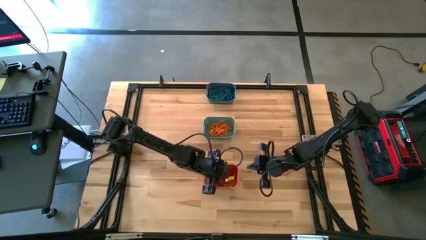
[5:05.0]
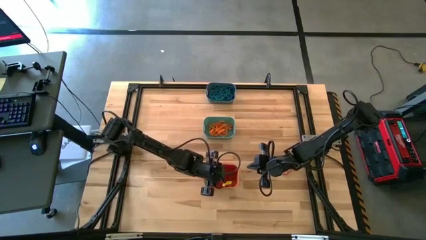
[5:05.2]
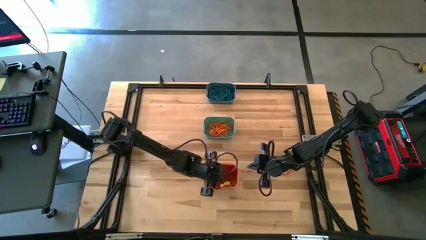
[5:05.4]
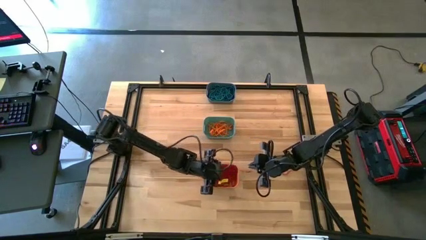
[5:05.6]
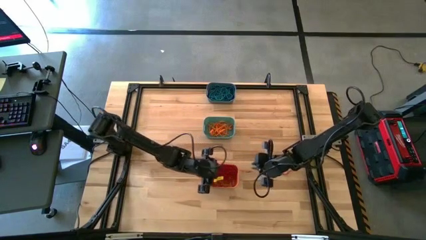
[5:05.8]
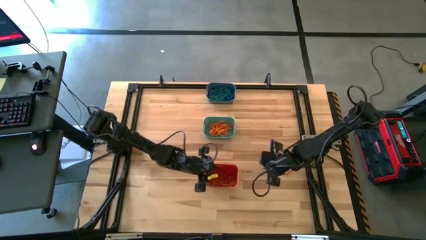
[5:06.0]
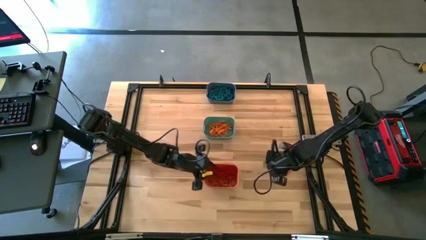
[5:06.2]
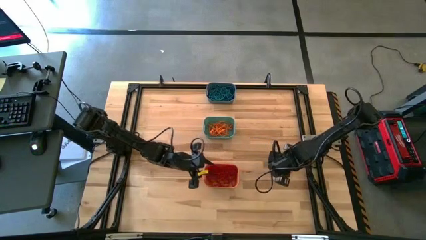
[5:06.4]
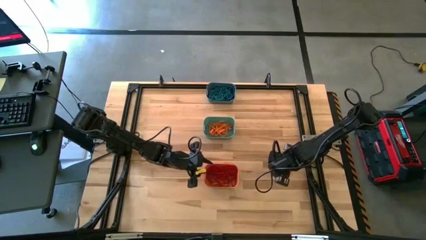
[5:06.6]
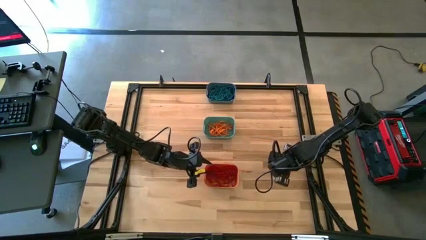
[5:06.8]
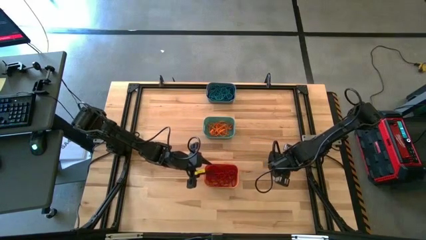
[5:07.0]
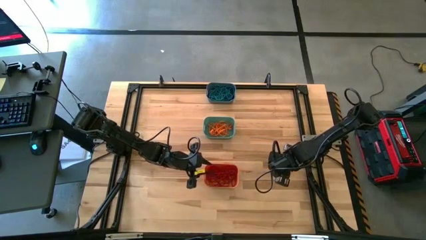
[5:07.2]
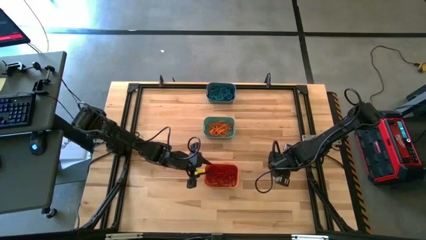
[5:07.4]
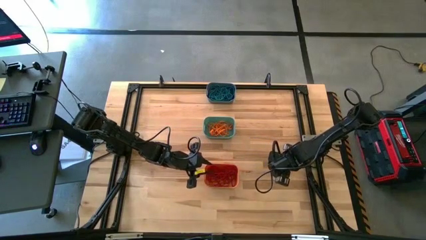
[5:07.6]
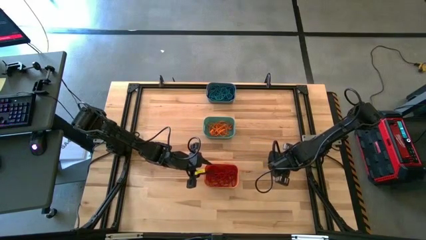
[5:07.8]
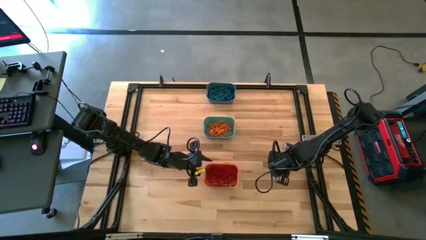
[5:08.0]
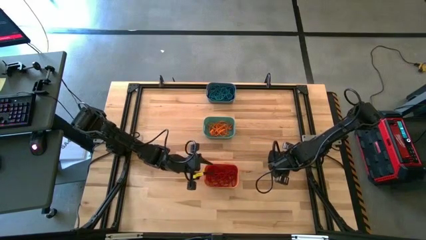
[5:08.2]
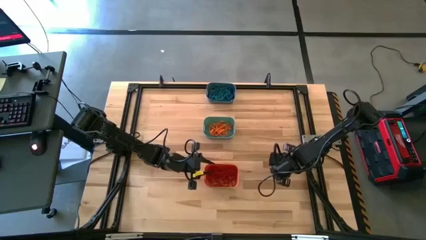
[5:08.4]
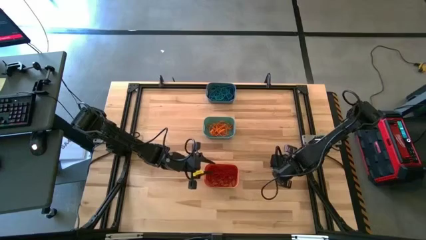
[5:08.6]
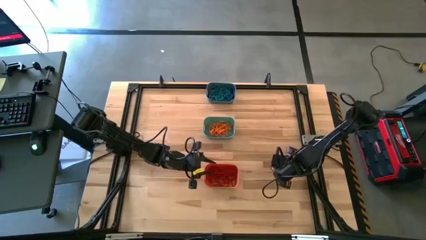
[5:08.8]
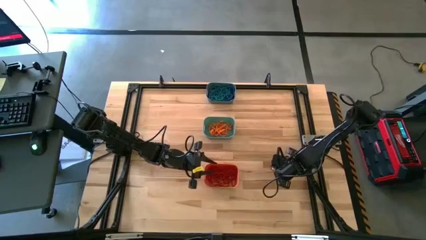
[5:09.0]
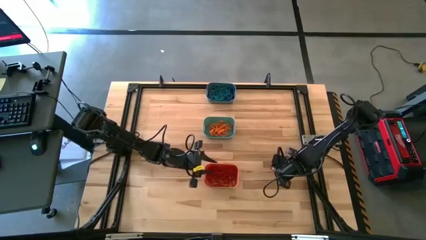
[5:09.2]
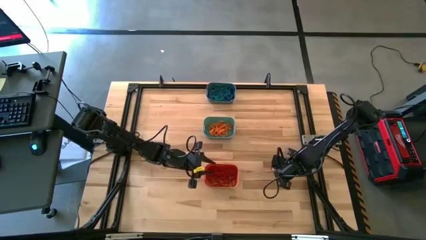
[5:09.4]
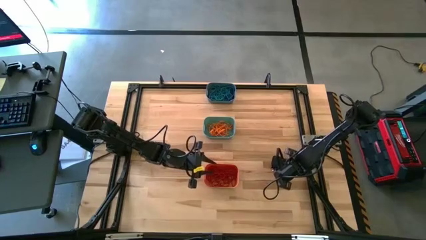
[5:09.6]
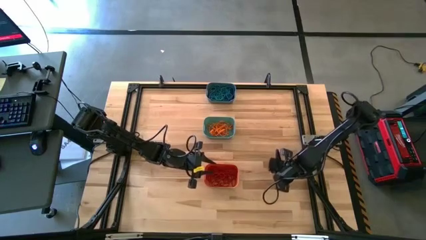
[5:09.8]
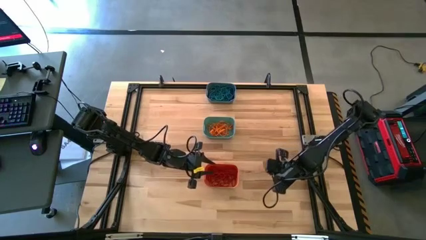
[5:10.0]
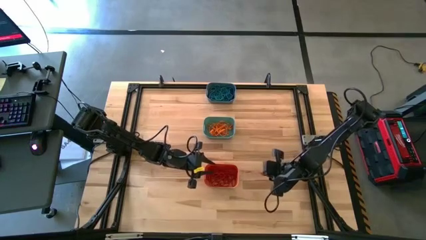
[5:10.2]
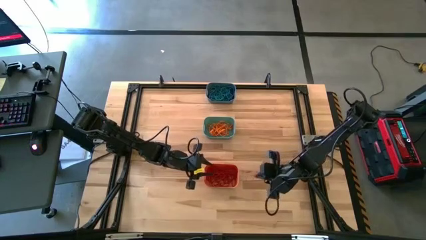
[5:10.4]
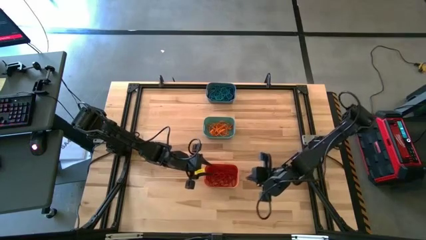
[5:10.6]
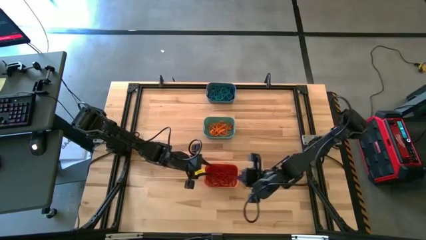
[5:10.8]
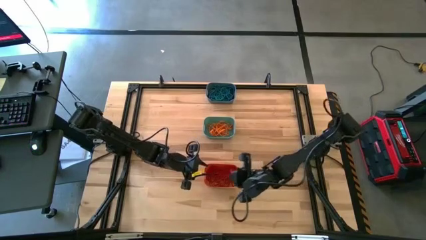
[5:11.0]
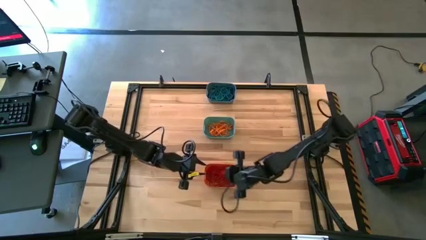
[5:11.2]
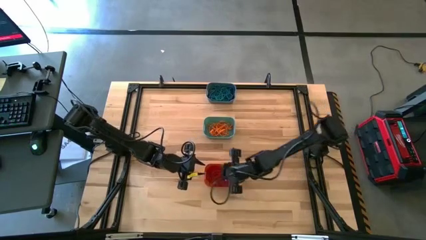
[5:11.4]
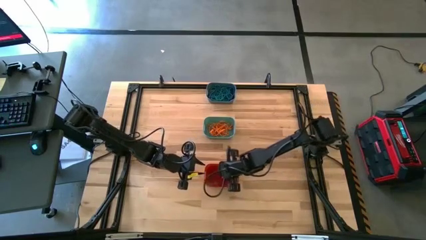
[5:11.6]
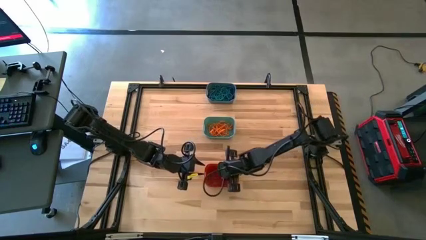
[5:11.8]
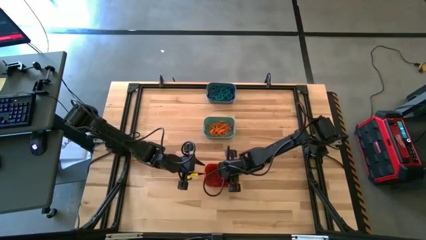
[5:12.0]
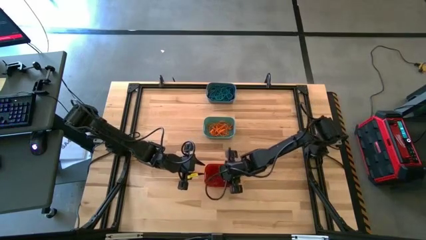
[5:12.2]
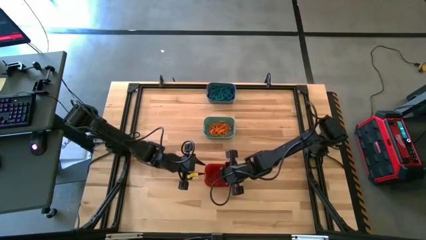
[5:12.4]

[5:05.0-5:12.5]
Task: Sort rubber bands into baskets
Put the red rubber band into the orange bin

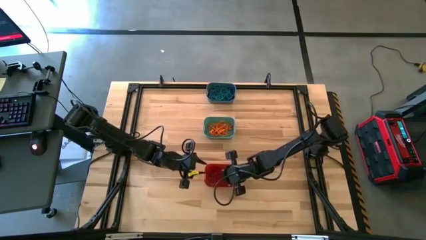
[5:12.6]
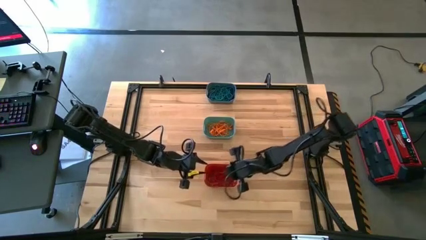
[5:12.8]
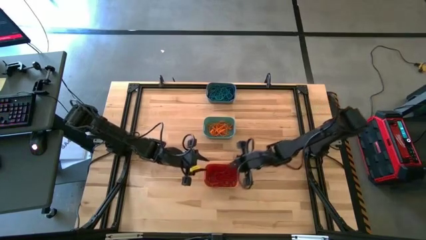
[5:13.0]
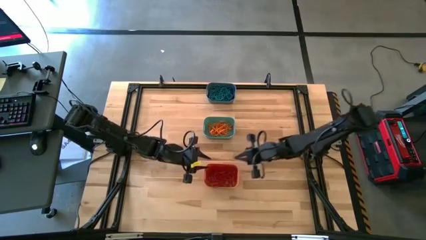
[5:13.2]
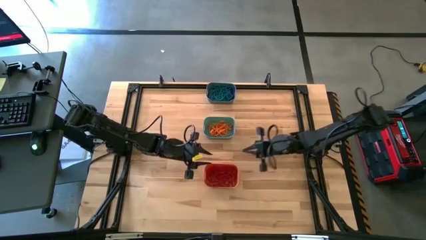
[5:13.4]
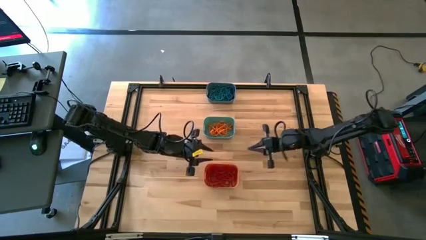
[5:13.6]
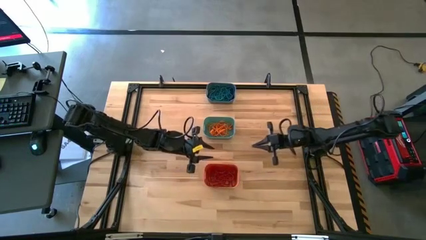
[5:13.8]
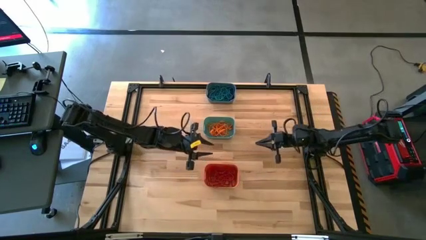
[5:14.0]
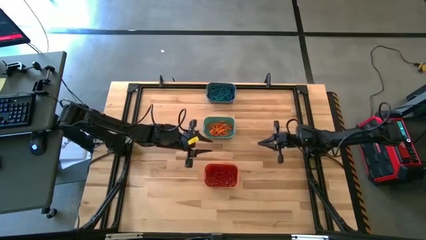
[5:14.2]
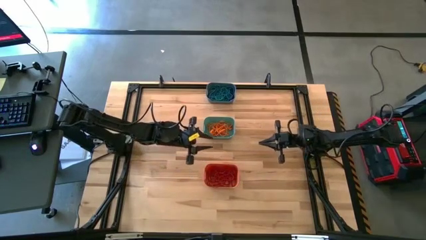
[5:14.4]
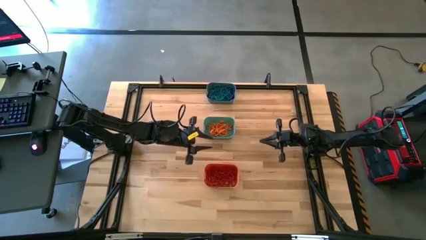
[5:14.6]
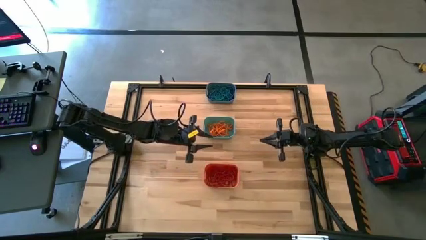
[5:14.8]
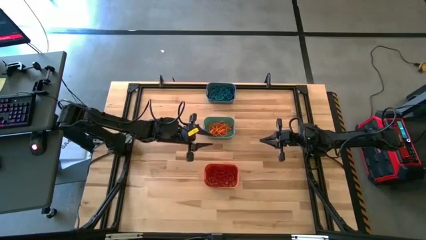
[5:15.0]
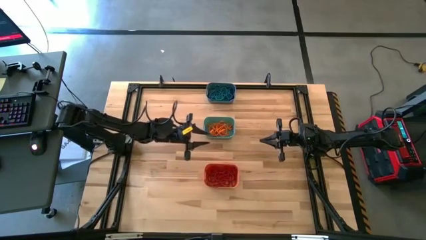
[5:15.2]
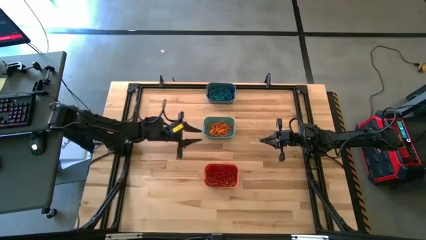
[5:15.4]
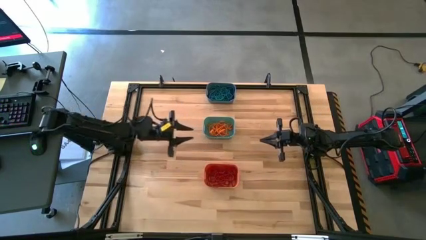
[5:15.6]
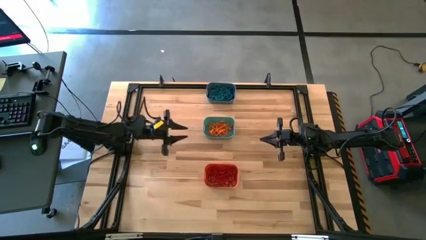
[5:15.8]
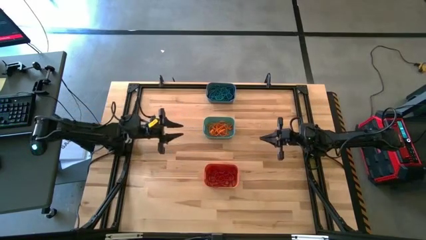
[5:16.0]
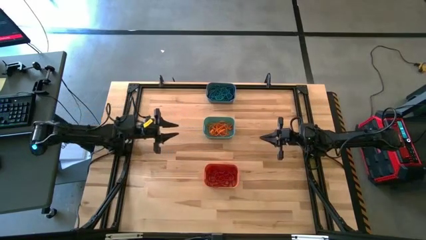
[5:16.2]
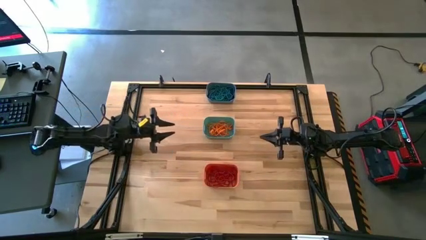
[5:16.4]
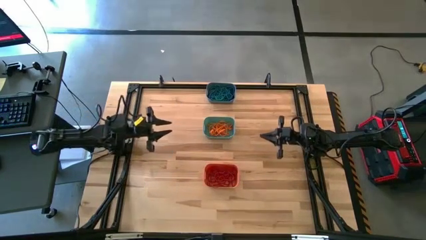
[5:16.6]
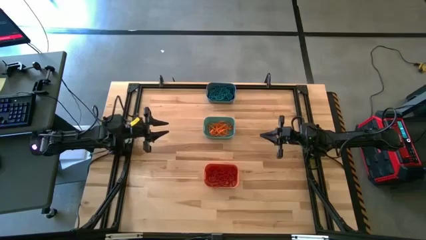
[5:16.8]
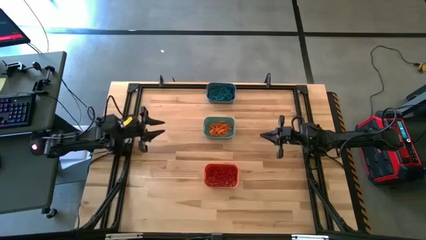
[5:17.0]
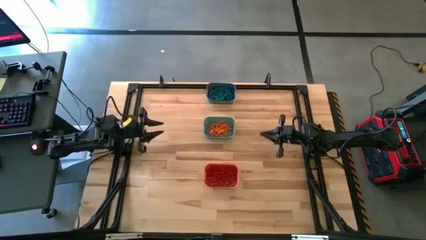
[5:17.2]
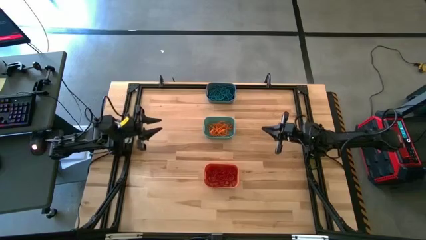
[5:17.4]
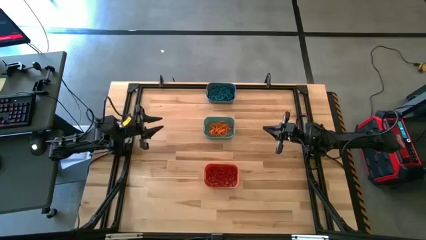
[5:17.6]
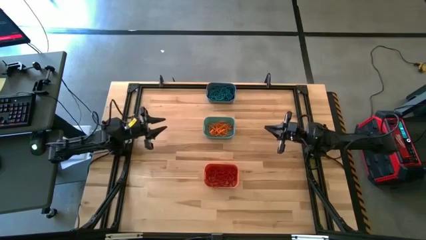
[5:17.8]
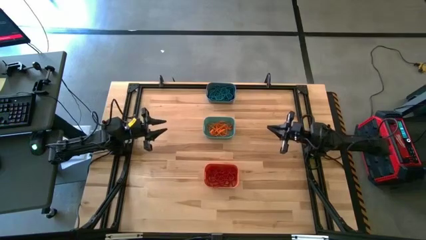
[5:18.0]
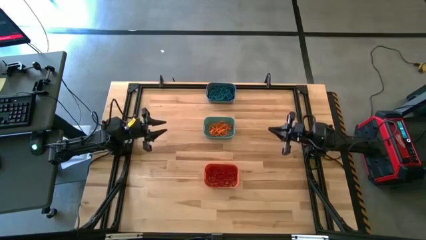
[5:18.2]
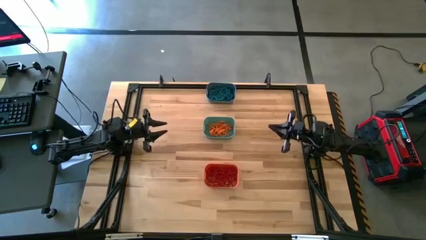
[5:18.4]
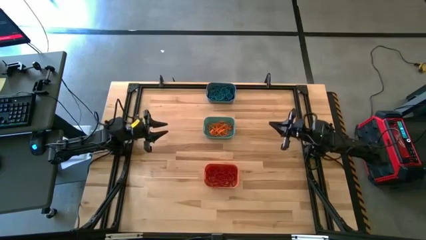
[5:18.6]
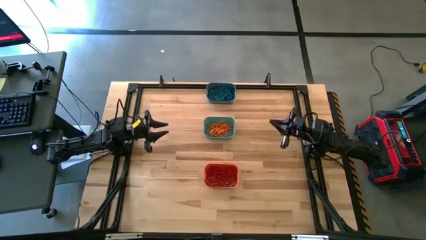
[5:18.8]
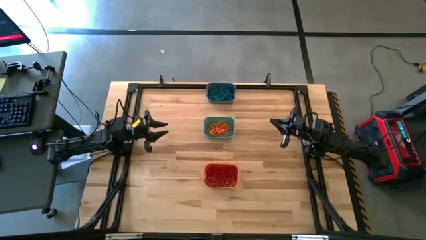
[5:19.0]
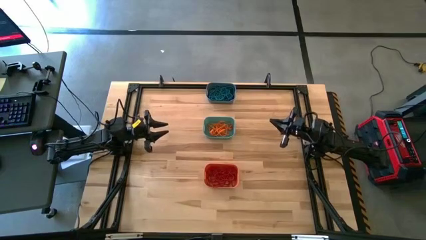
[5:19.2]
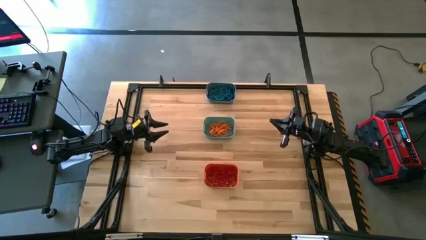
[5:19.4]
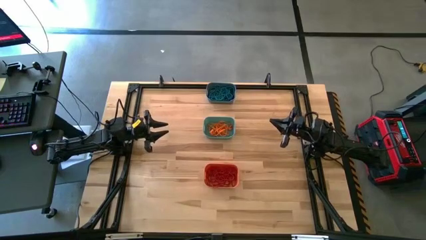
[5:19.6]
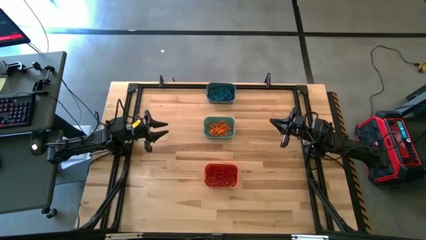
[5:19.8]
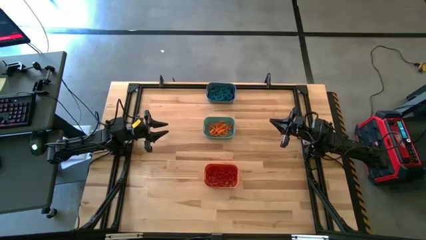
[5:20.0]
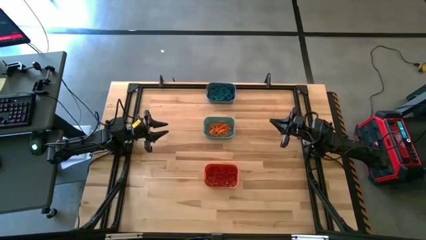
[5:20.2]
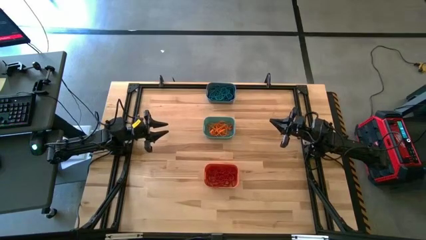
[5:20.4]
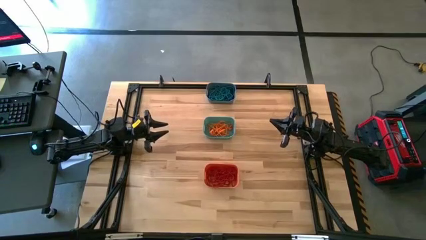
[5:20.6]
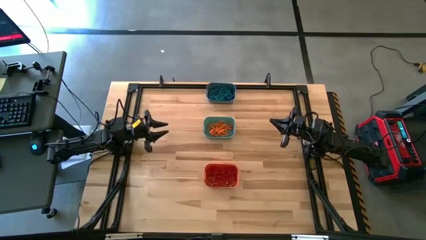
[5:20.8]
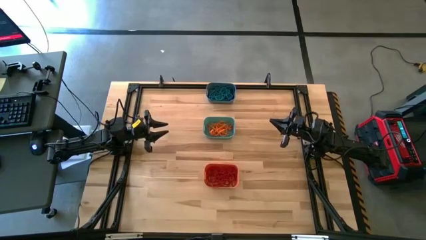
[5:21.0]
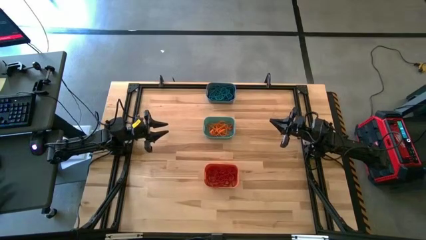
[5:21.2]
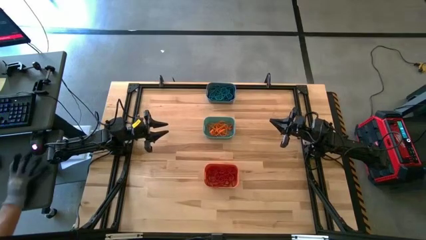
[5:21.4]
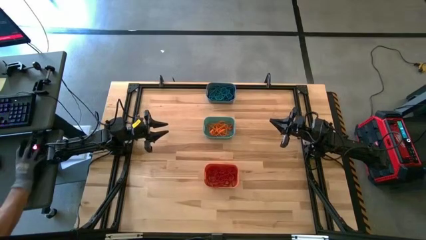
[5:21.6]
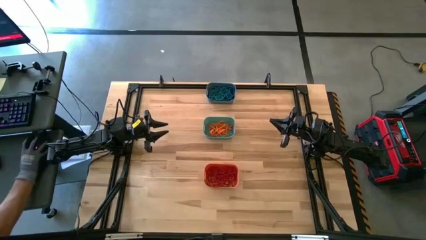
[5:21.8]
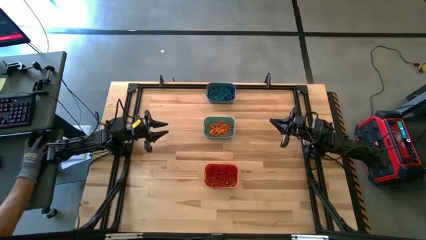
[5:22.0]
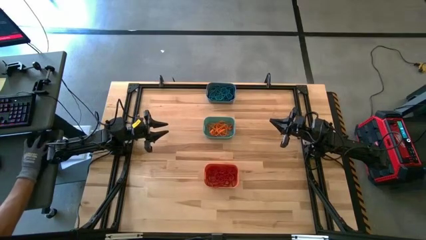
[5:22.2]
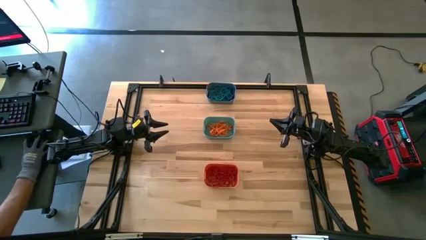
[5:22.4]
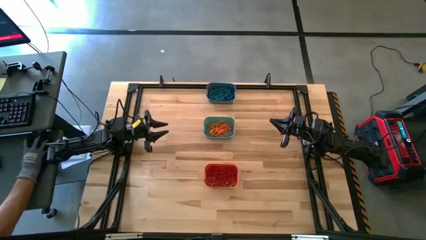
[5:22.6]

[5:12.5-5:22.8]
Return to Home Position
